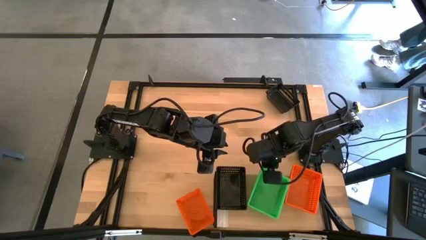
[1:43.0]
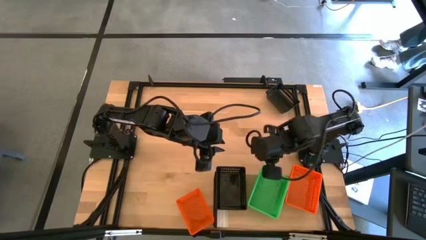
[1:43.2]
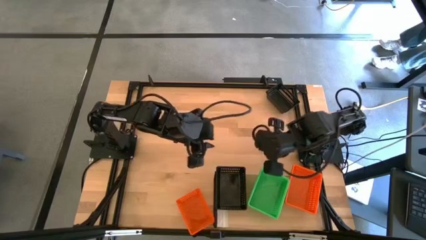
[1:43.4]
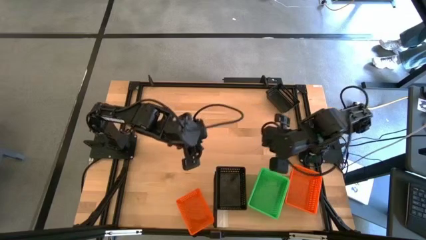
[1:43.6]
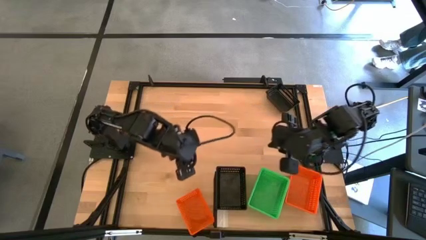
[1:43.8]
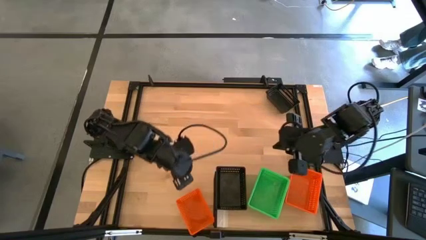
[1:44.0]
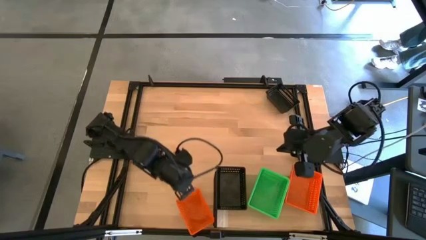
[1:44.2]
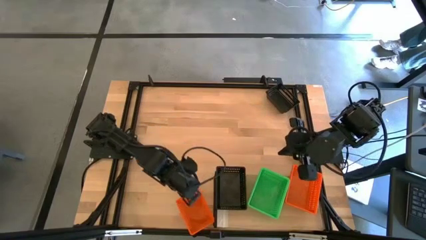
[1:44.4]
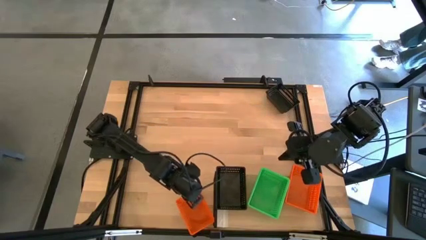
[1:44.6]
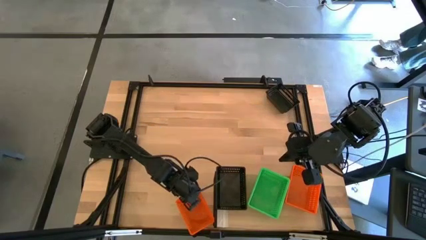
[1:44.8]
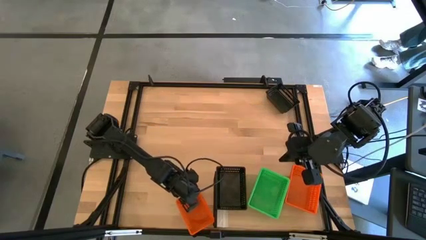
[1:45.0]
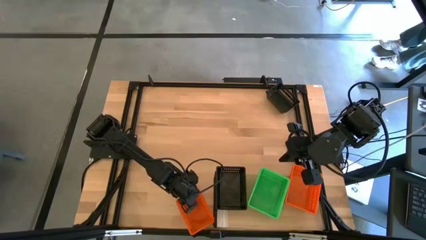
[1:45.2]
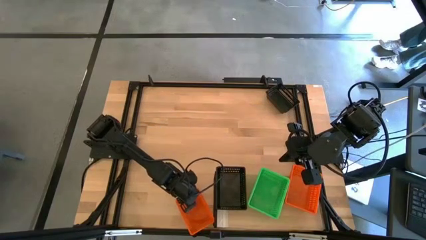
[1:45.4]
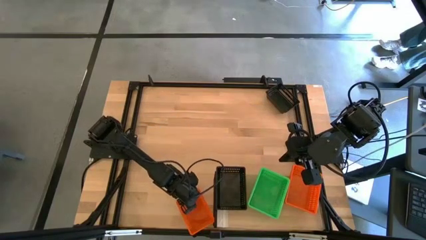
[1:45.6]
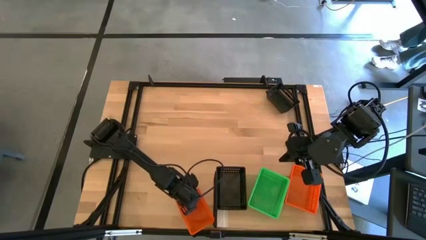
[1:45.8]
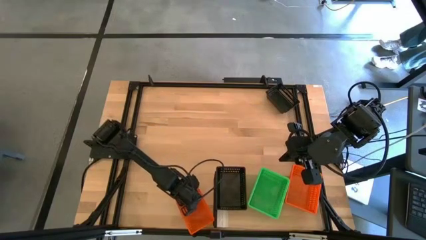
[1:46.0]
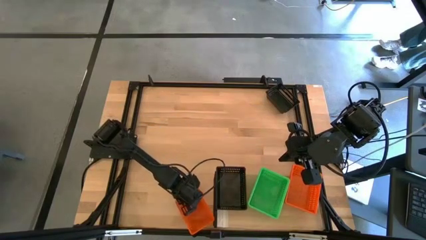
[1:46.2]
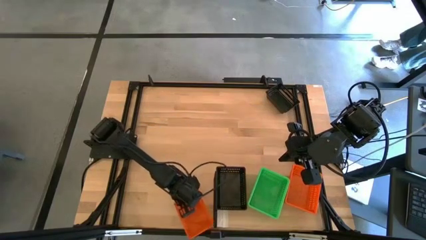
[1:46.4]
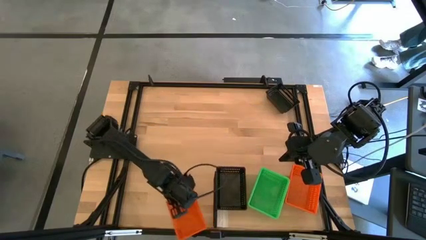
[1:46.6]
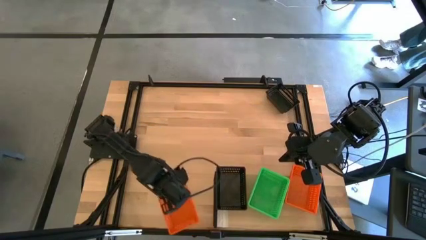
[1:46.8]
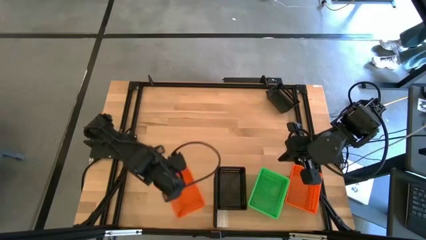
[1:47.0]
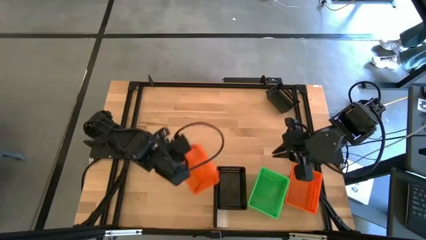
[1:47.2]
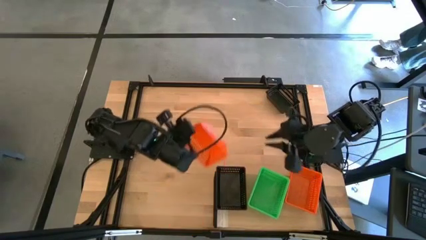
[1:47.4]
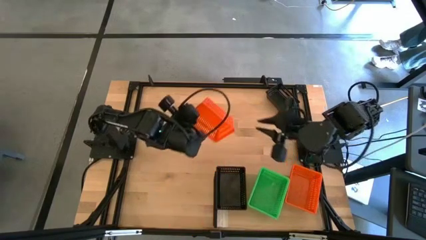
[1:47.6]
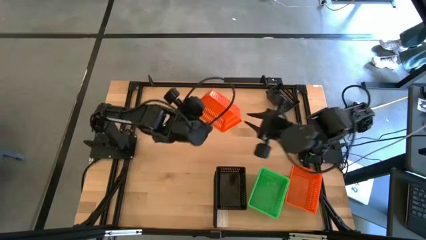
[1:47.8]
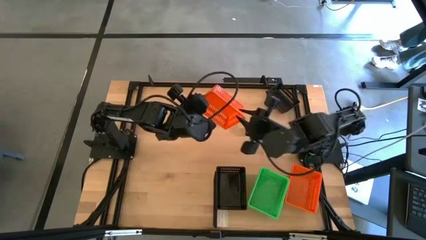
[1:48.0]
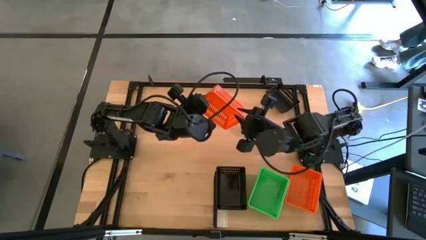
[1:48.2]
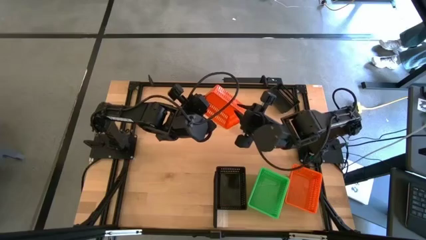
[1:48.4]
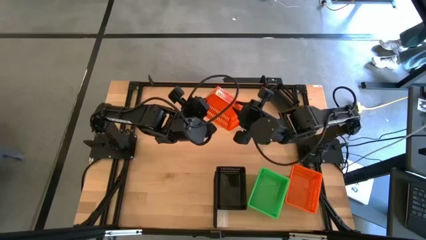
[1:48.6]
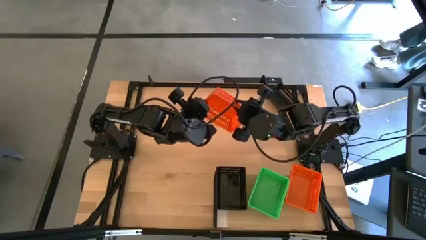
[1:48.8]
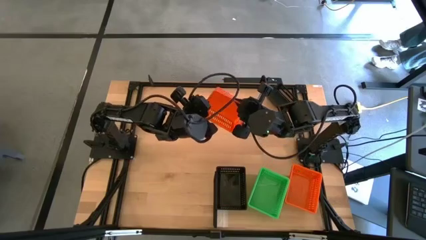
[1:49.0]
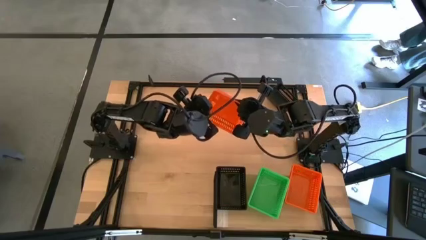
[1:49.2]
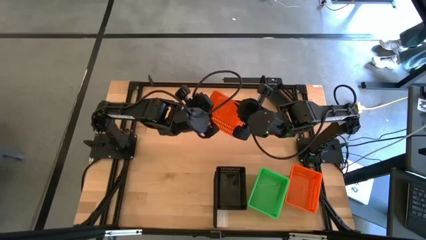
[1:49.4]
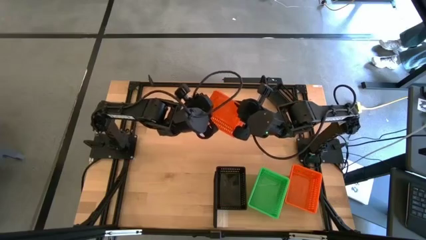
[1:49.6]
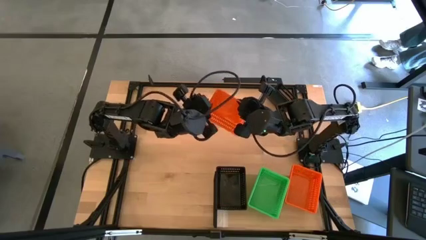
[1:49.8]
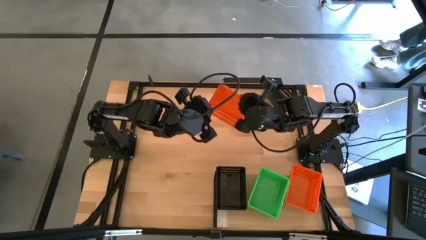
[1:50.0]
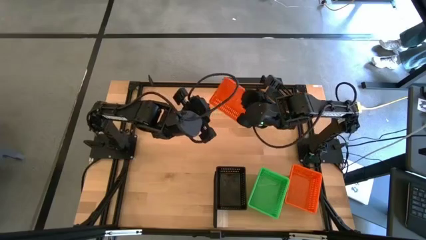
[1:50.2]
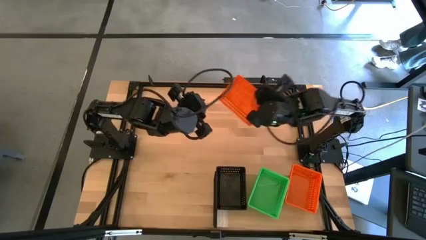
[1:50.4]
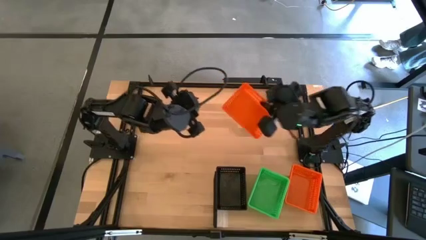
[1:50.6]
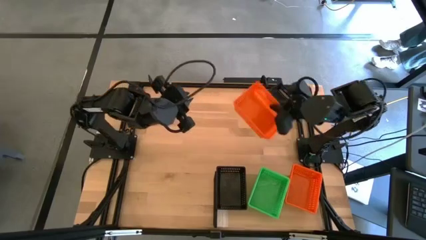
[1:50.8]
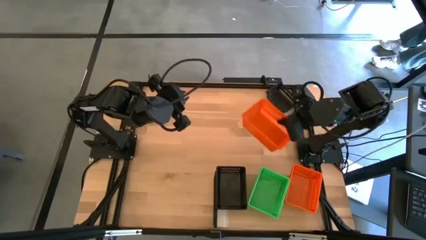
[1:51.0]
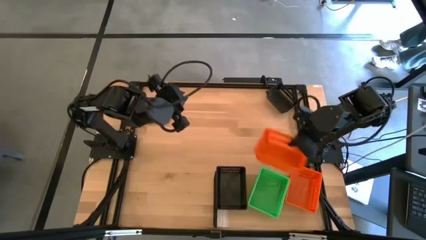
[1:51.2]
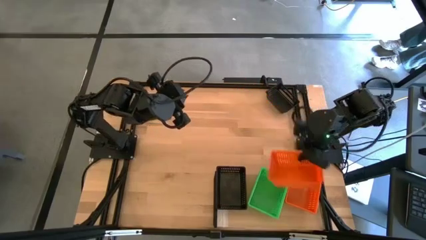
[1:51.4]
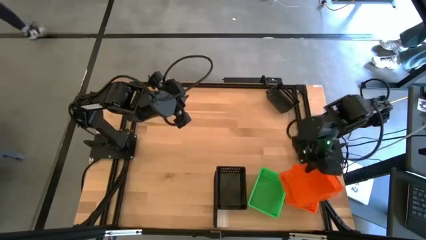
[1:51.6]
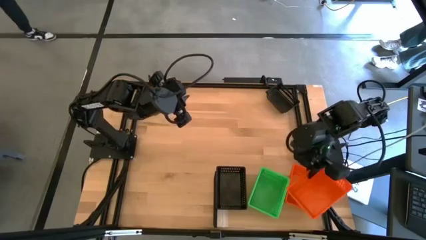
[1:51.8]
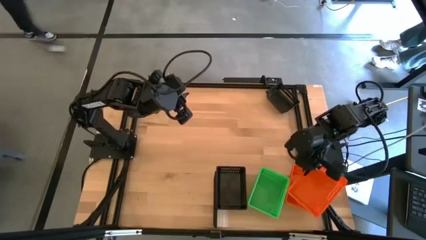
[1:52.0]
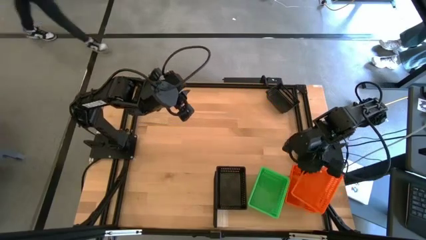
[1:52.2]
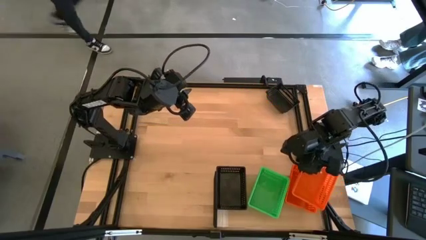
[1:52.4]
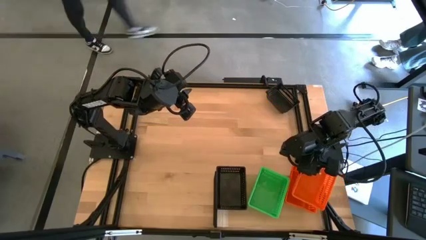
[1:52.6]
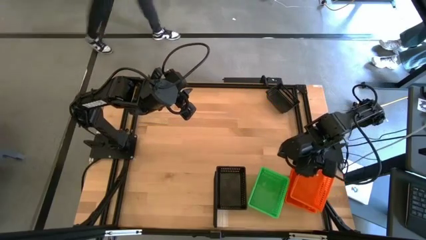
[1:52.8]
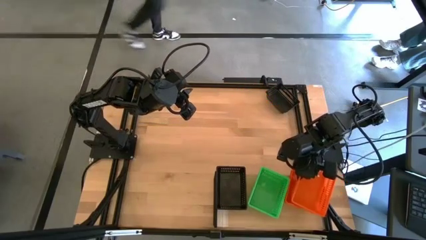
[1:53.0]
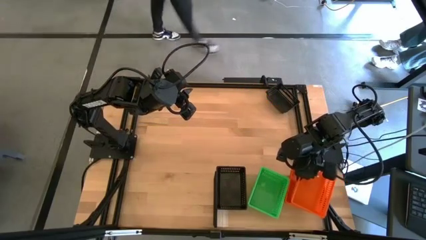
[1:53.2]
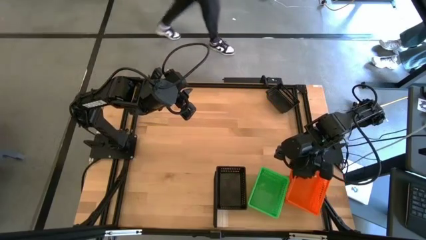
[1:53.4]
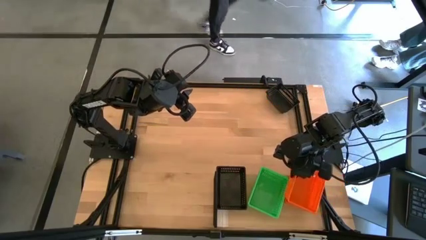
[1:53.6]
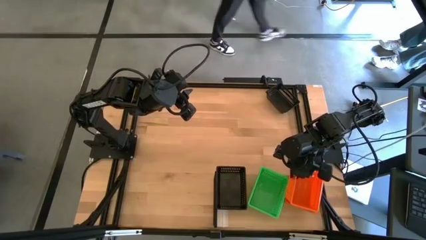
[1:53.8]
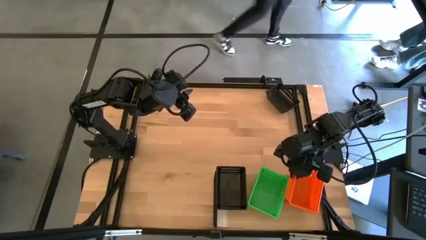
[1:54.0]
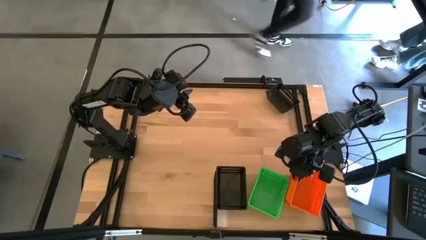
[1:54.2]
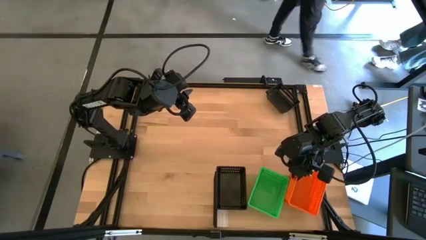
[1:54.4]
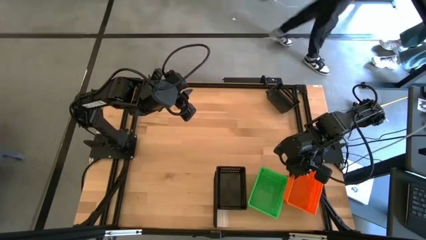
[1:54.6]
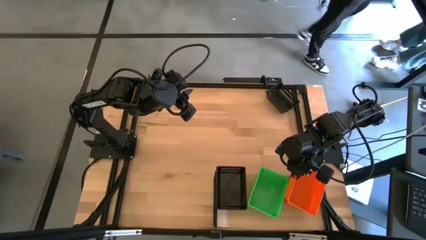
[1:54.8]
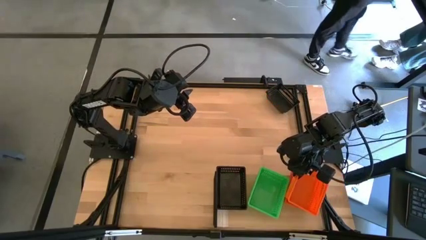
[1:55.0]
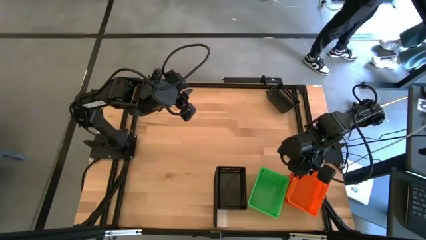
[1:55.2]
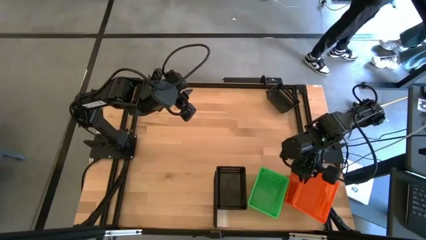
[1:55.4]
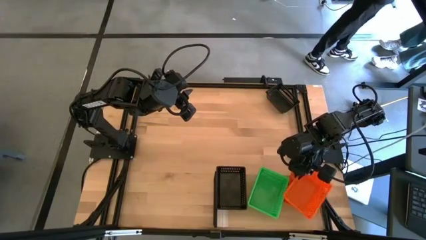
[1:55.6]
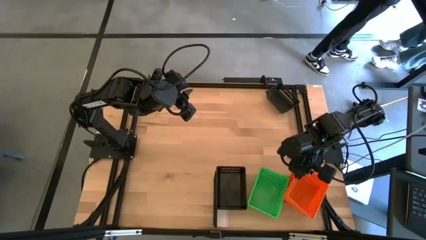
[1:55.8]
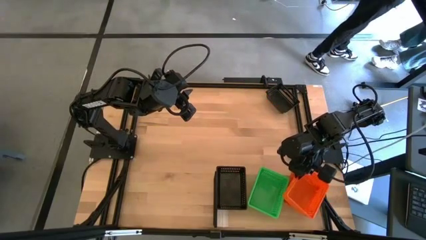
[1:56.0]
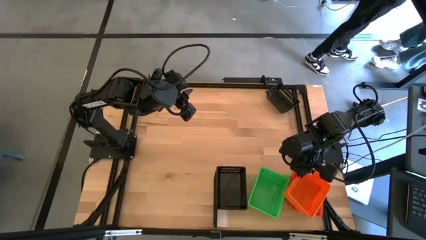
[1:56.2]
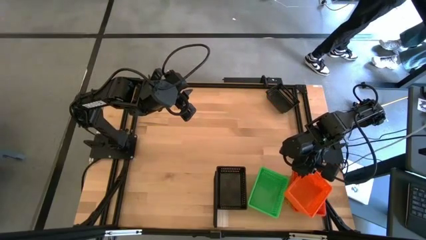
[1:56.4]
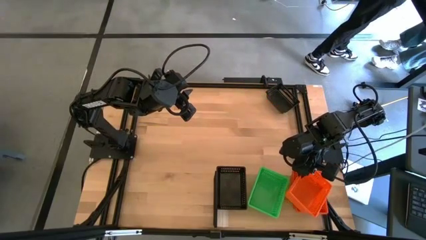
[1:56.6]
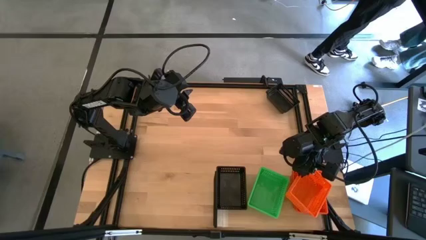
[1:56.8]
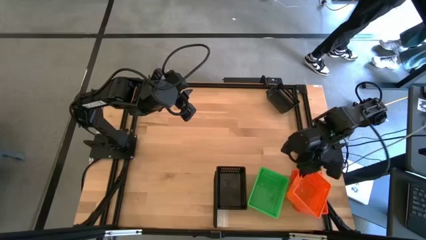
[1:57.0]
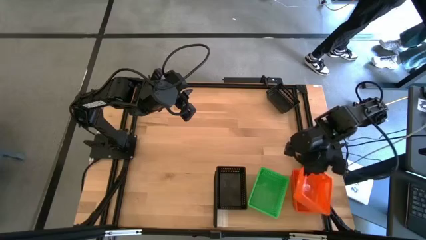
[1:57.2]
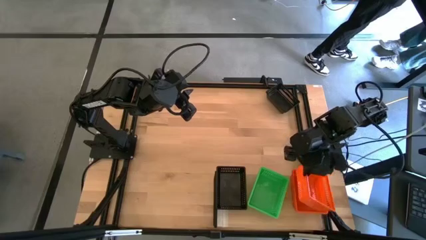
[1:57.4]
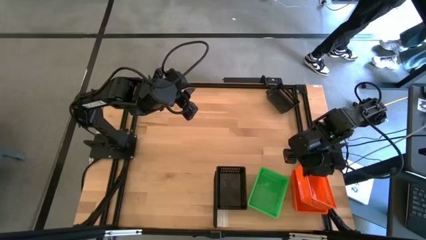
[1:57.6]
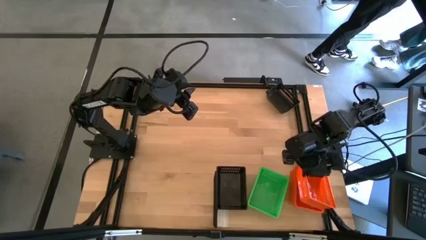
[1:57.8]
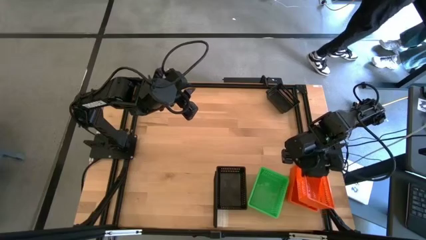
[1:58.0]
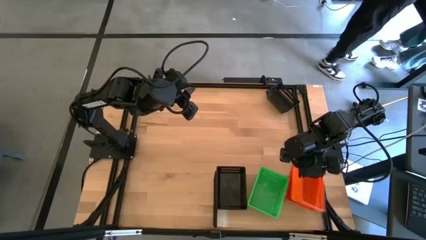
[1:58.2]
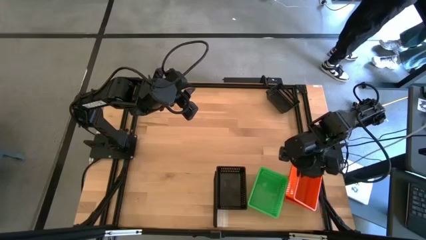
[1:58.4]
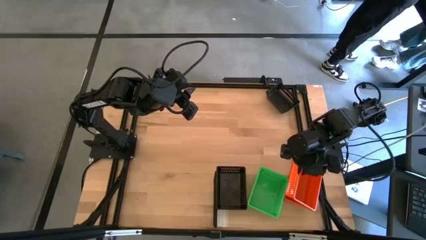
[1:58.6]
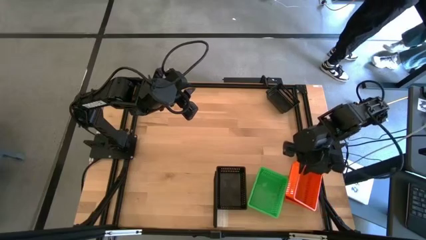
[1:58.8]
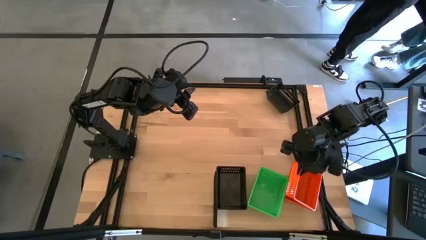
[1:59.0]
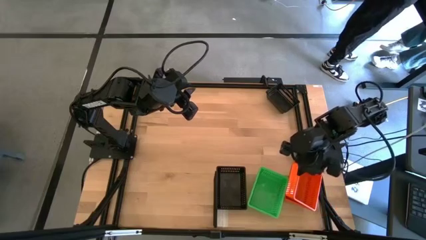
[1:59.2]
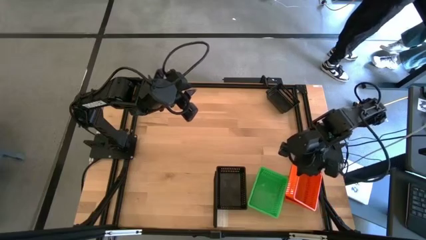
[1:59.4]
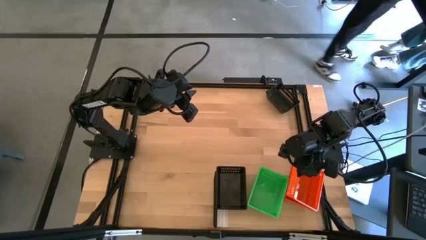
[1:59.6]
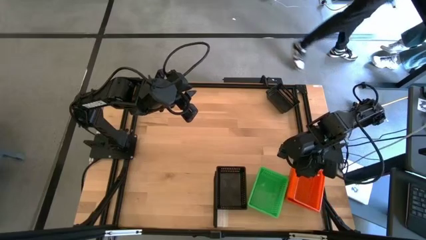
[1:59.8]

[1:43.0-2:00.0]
Task: Stack baskets on shelf by color
Stack the orange bin on the stacked orange bins on the shelf
